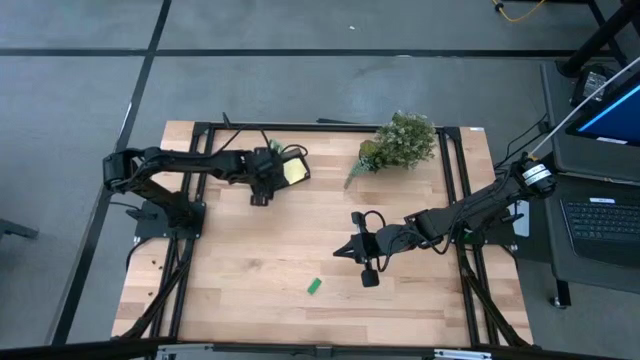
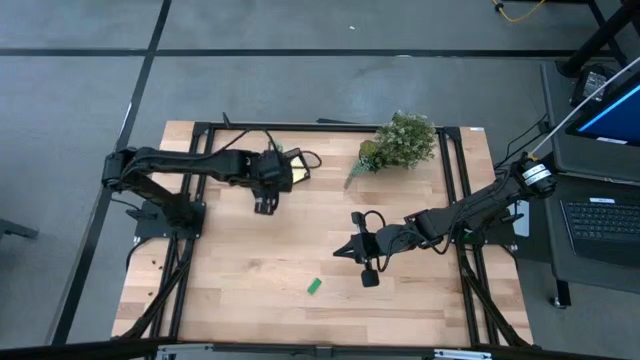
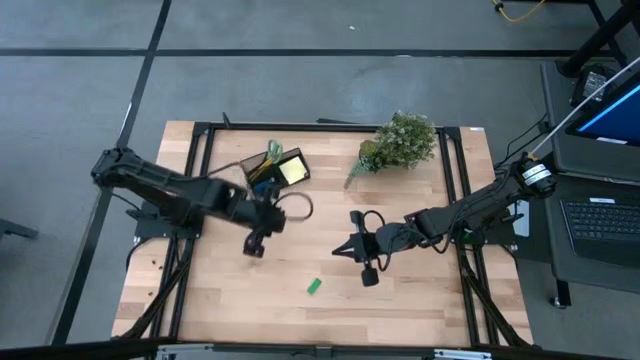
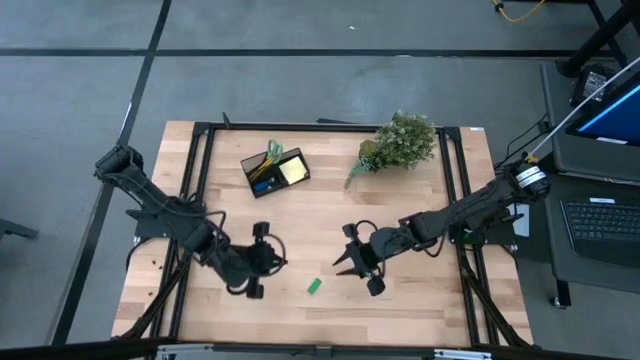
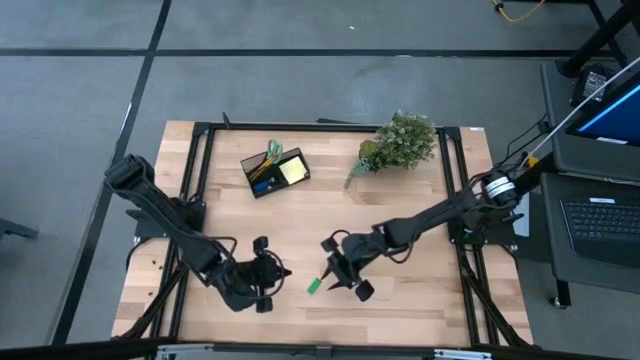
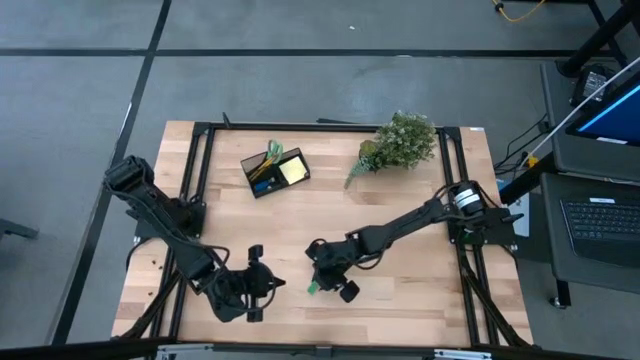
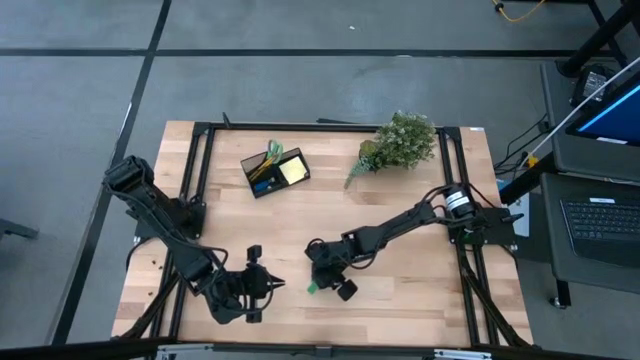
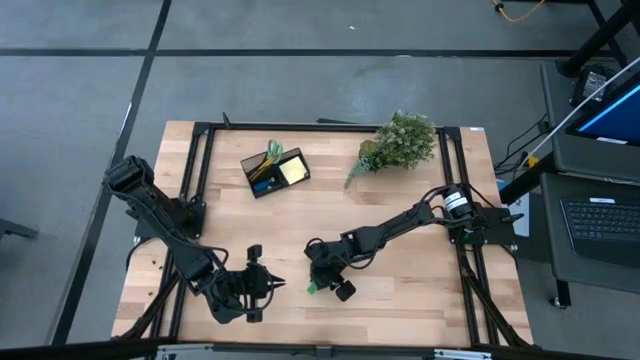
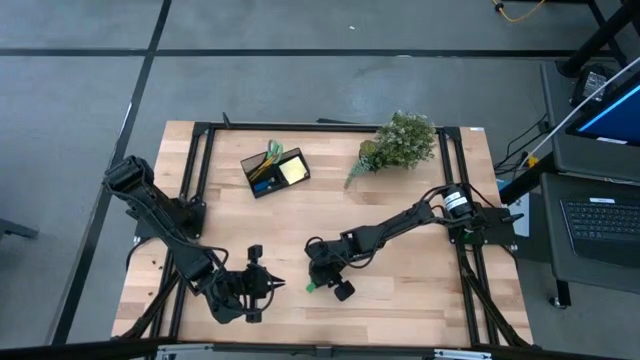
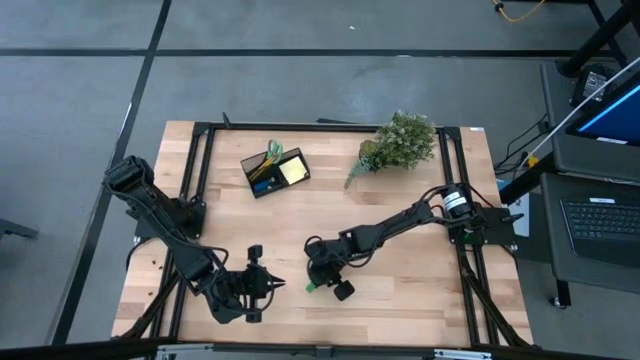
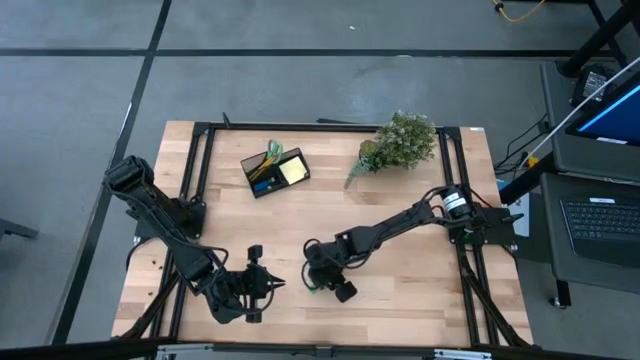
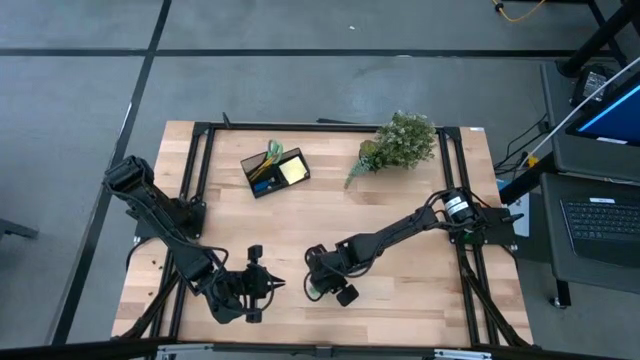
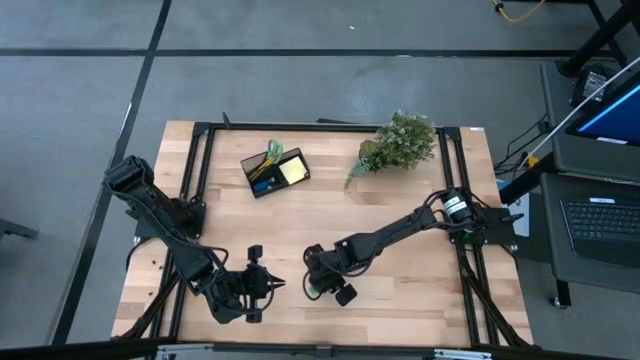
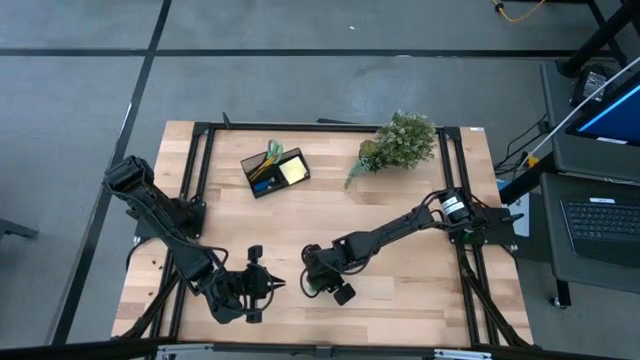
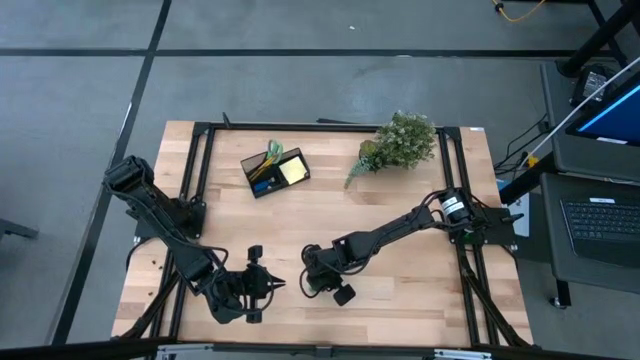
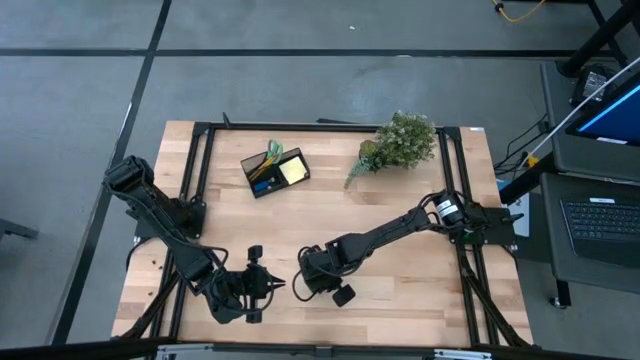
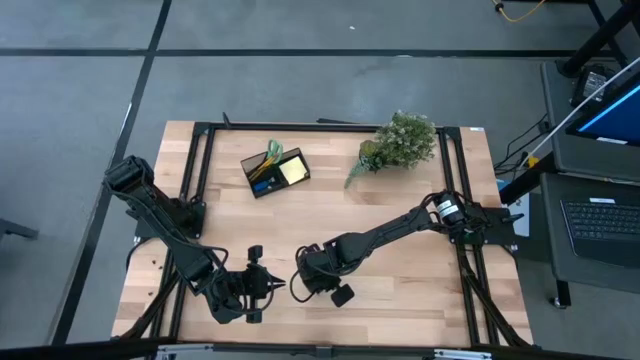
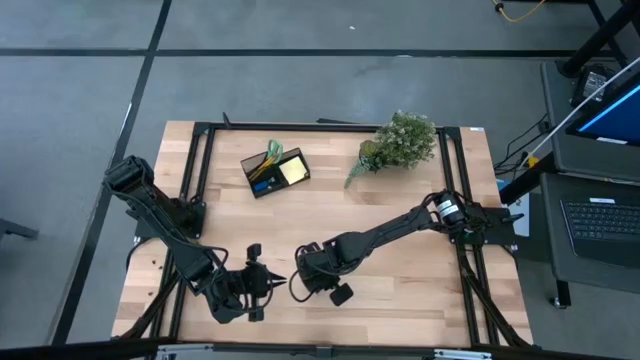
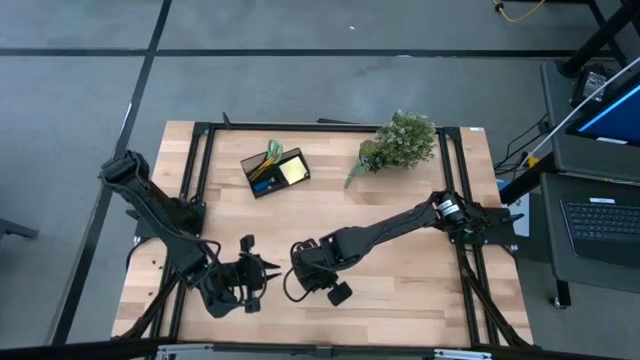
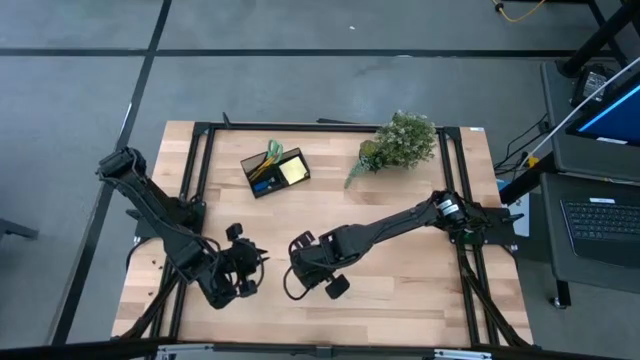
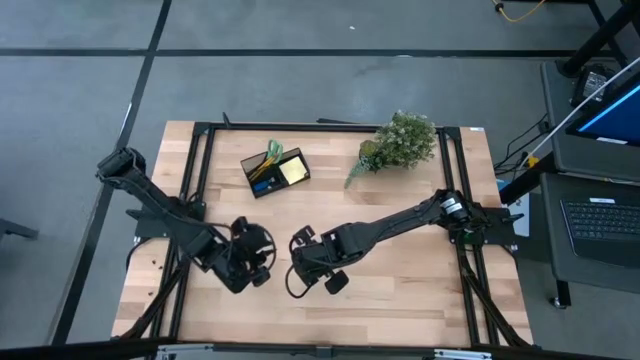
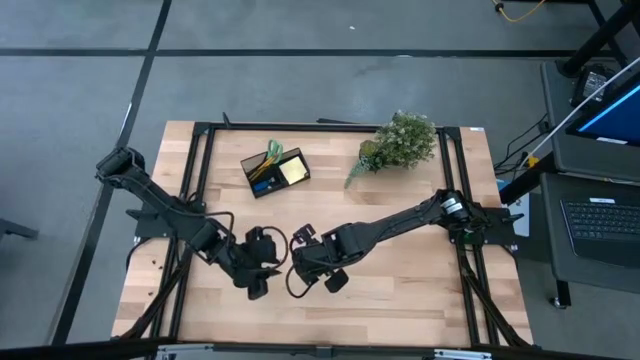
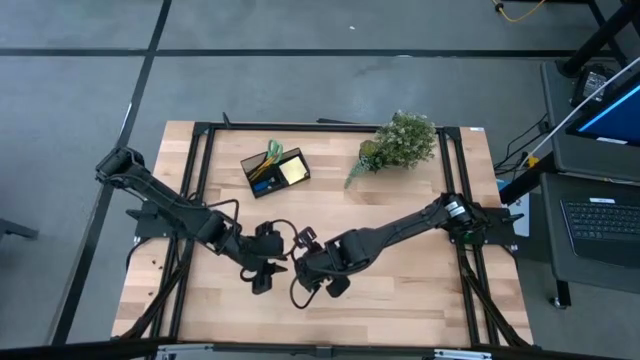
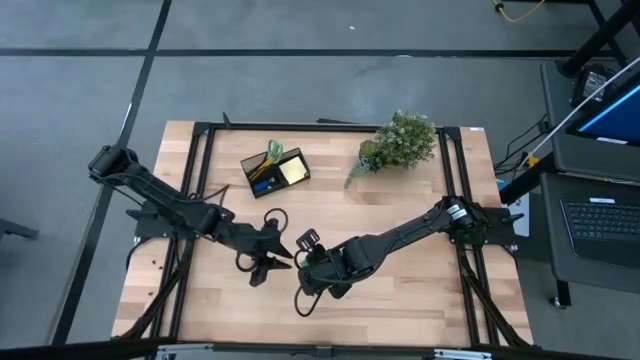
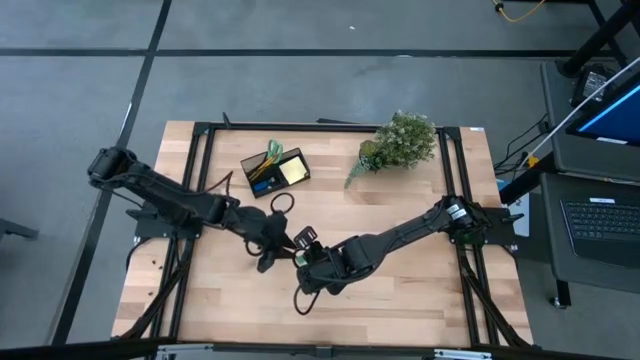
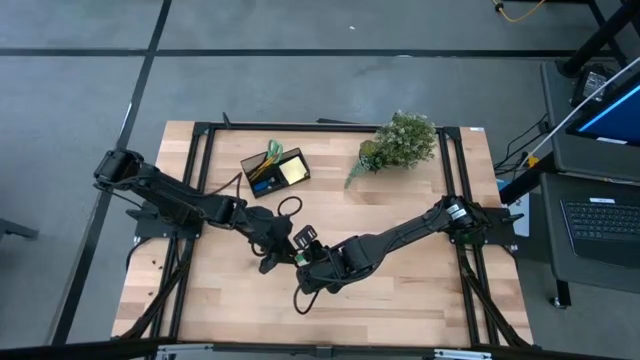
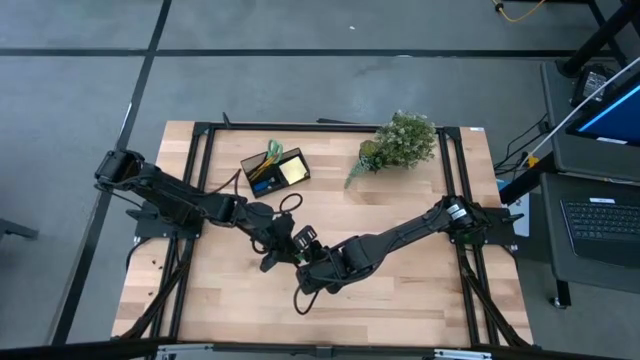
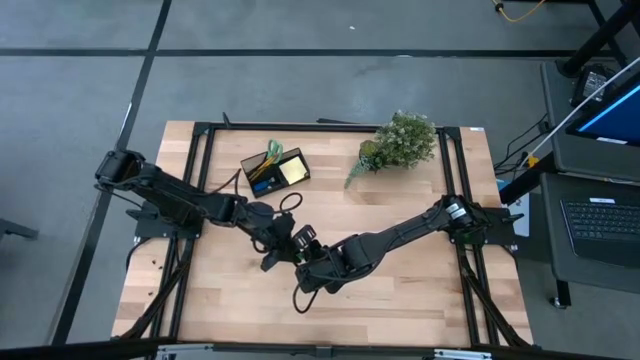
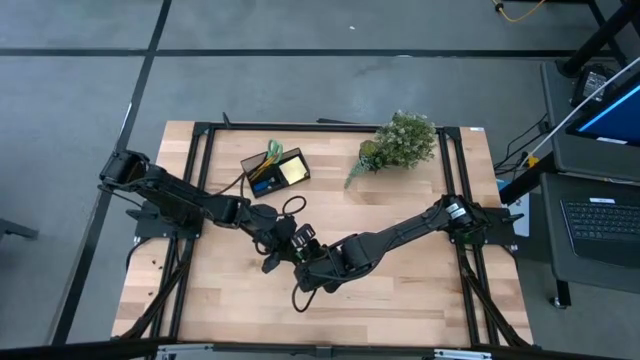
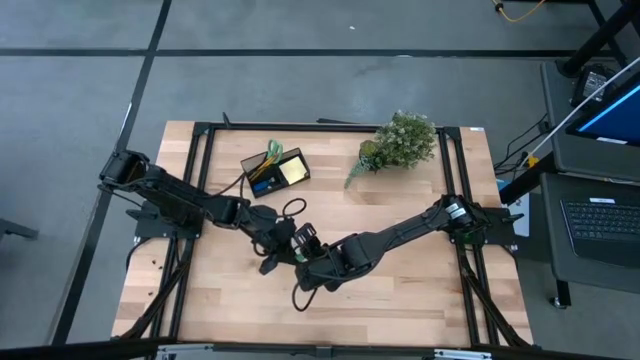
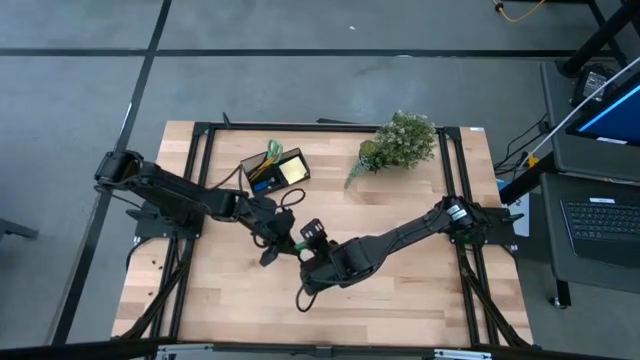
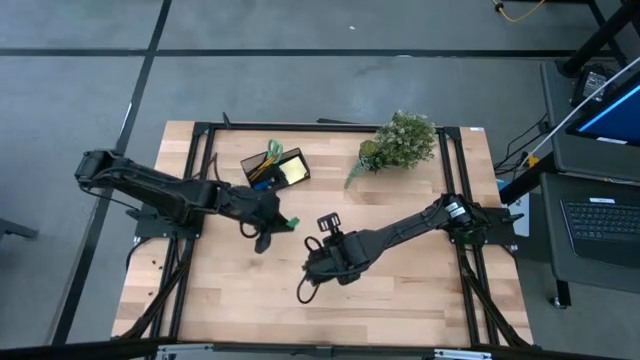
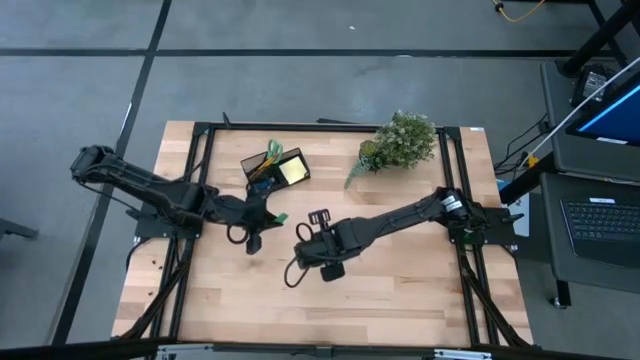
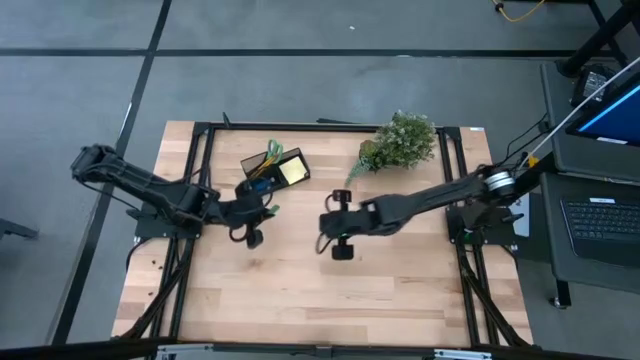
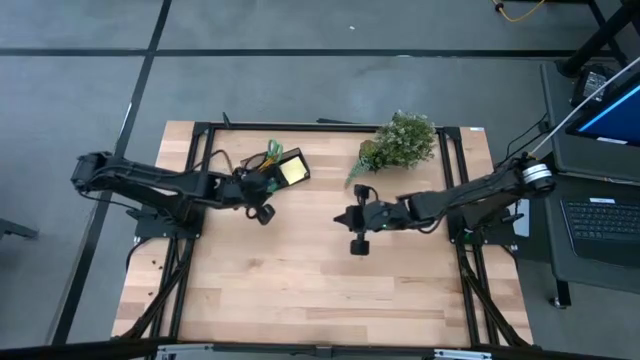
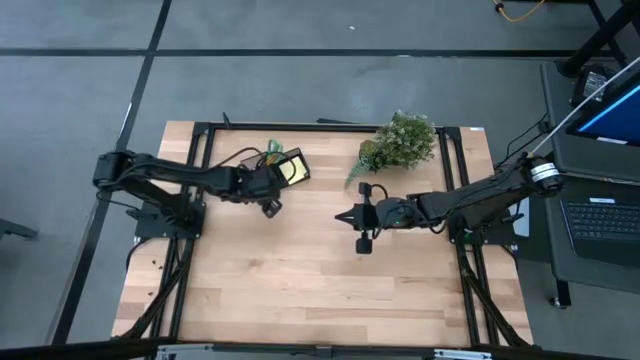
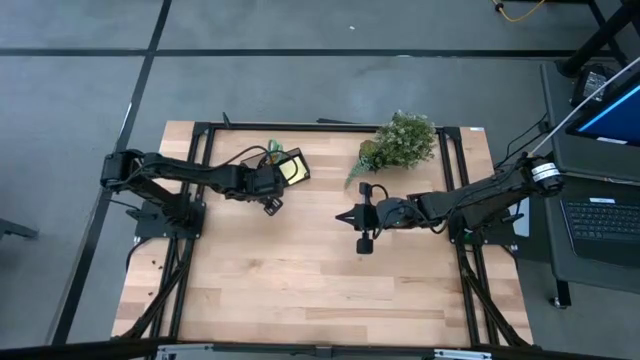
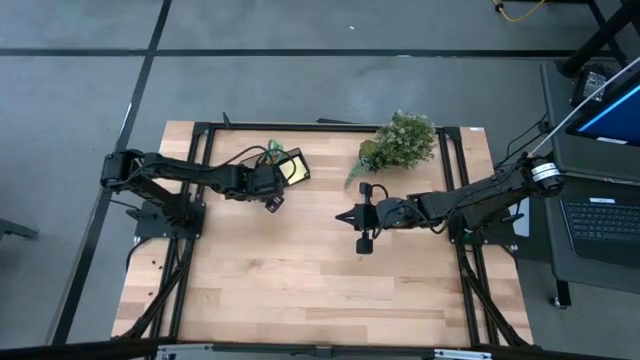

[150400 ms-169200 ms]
Task: Pick and place office supplies into organizer
Put the green eraser into the desk organizer

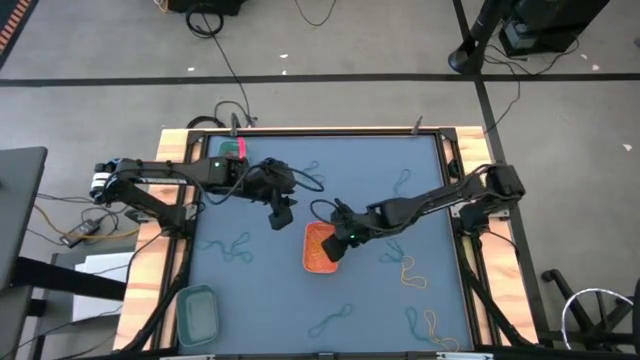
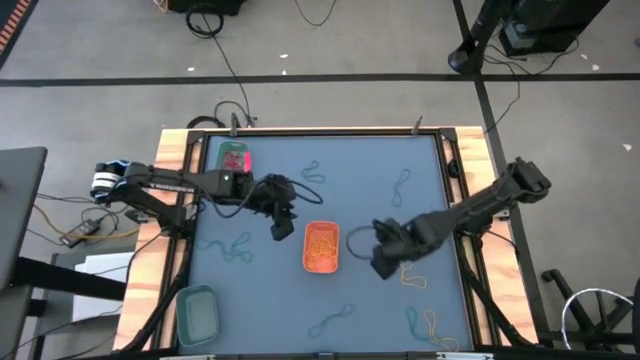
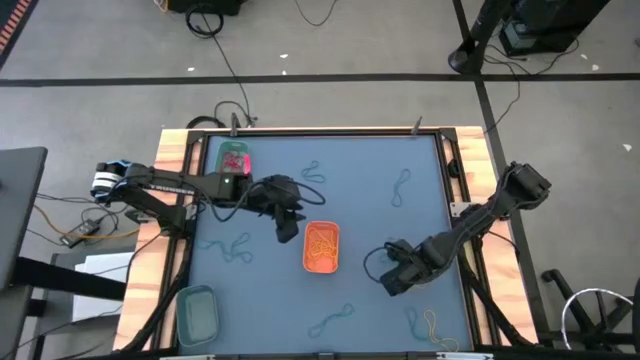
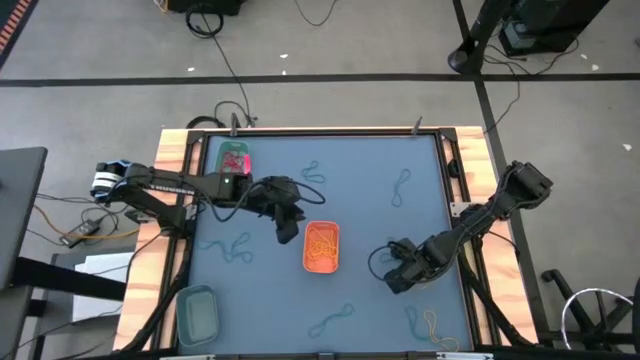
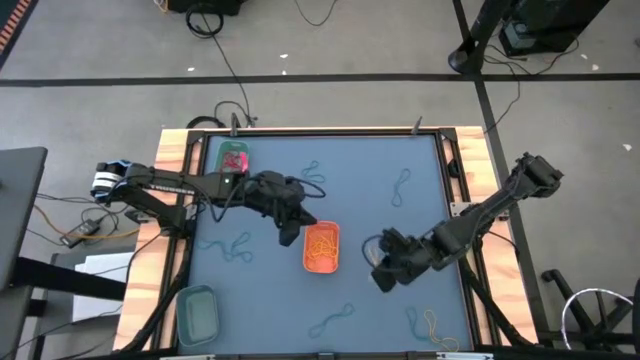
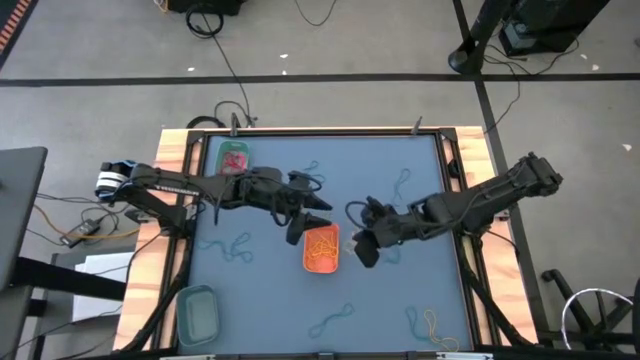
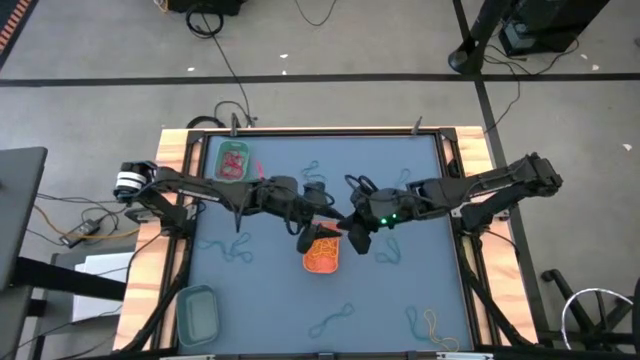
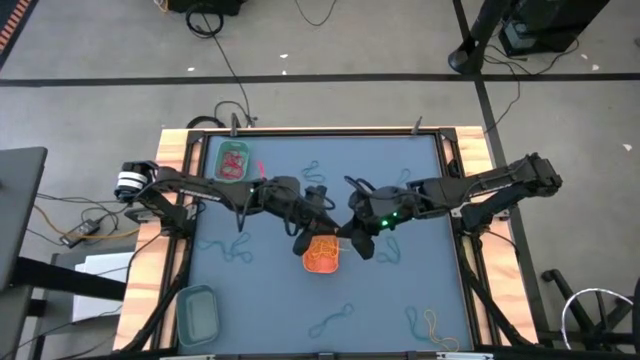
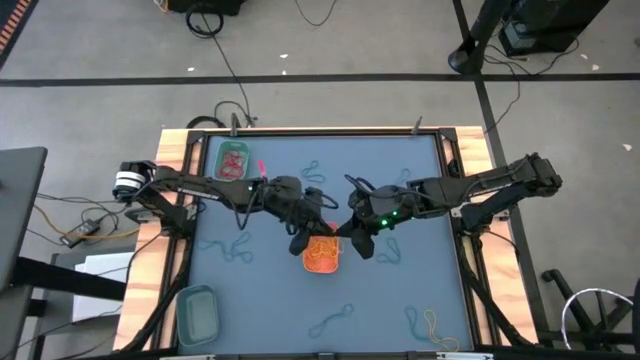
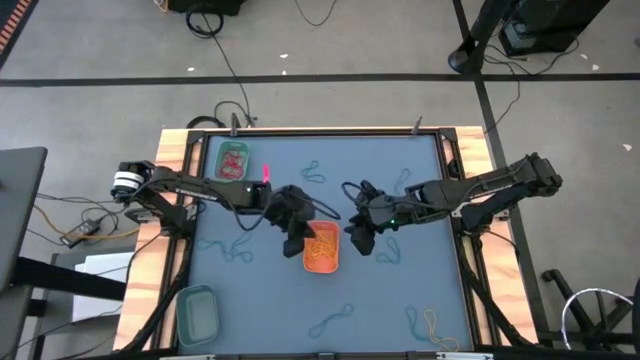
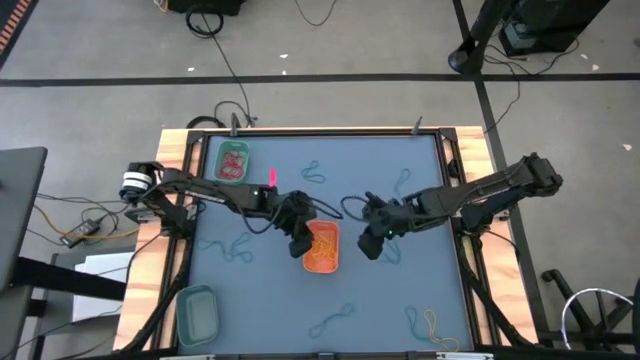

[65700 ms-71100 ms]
Task: Sort rubber bands into baskets
Put the yellow rubber band into the orange bin
